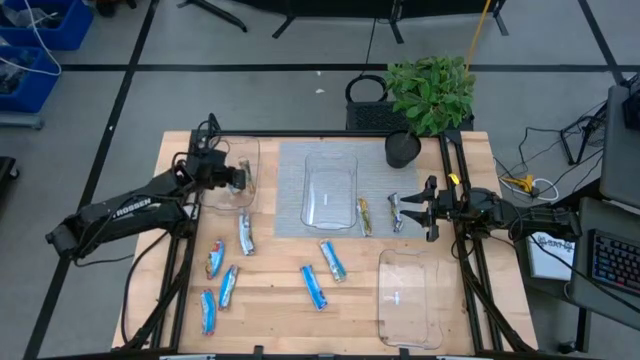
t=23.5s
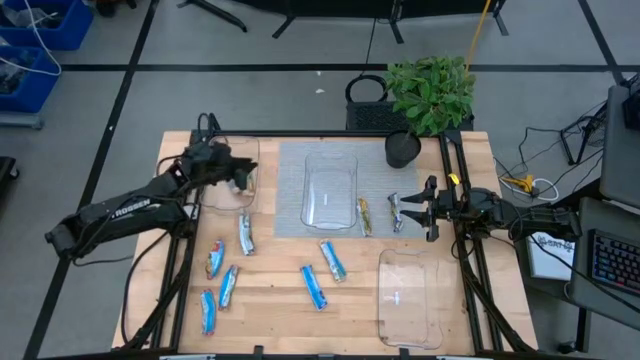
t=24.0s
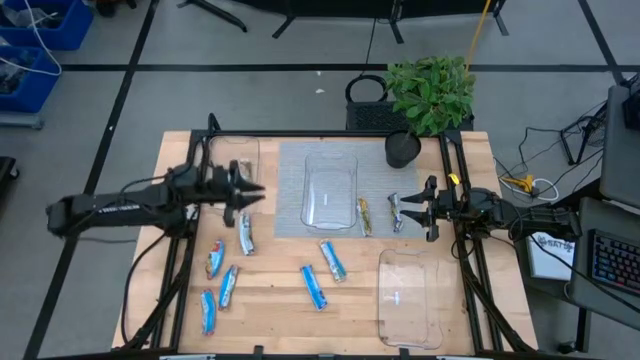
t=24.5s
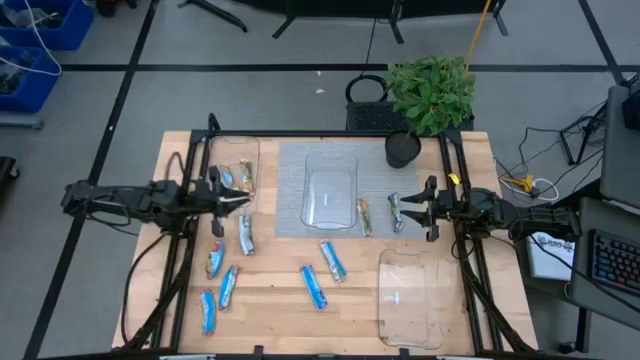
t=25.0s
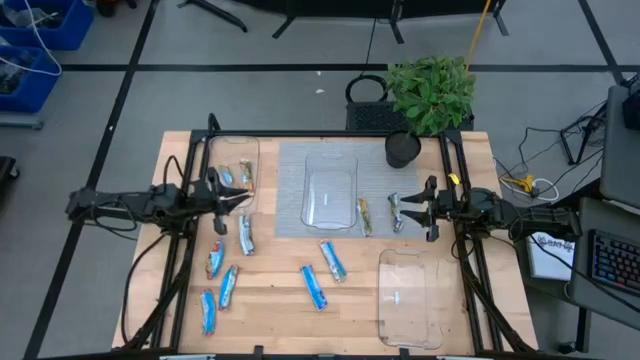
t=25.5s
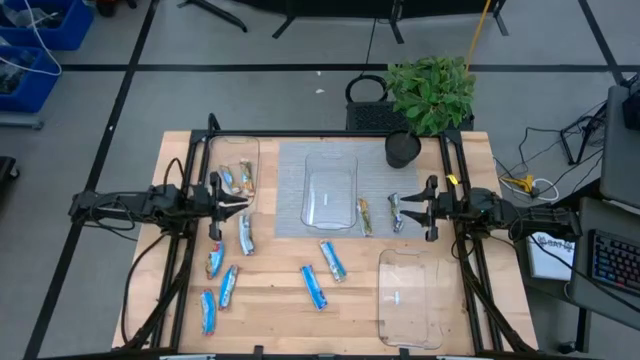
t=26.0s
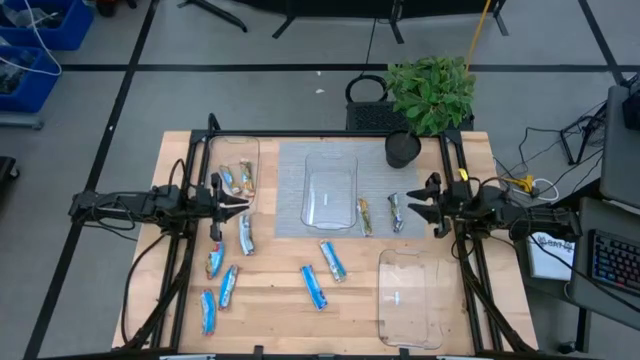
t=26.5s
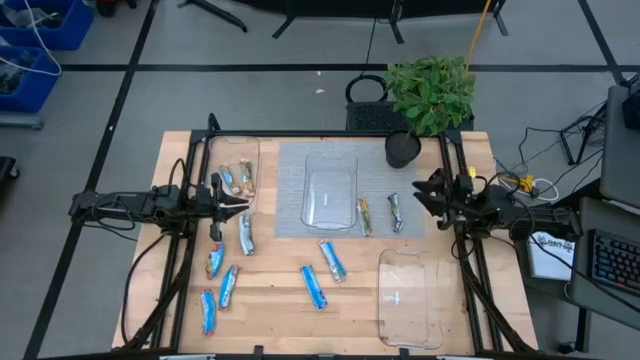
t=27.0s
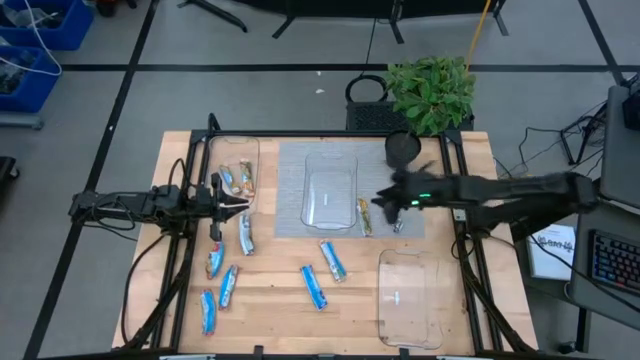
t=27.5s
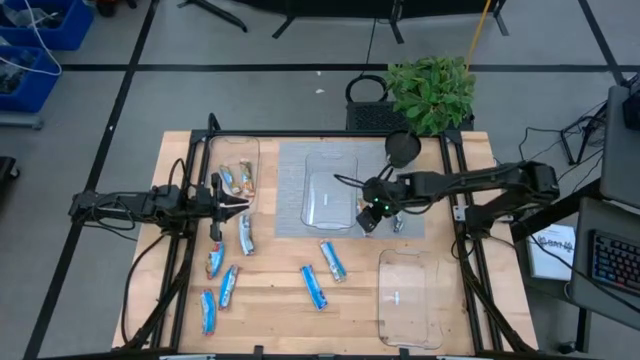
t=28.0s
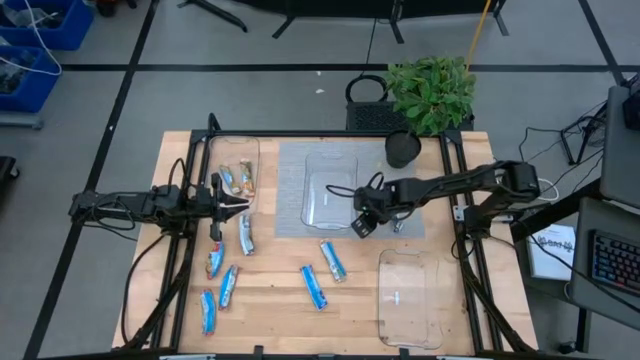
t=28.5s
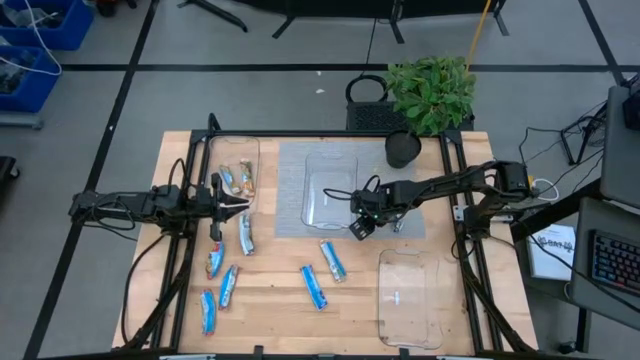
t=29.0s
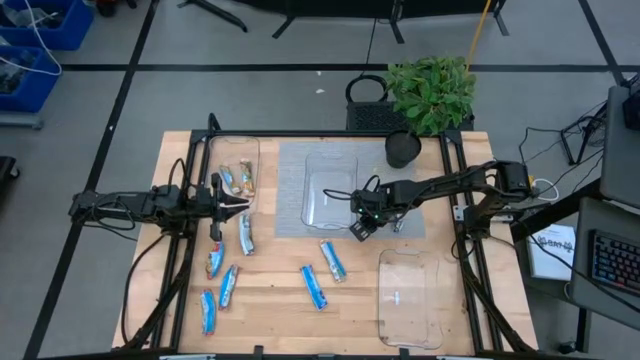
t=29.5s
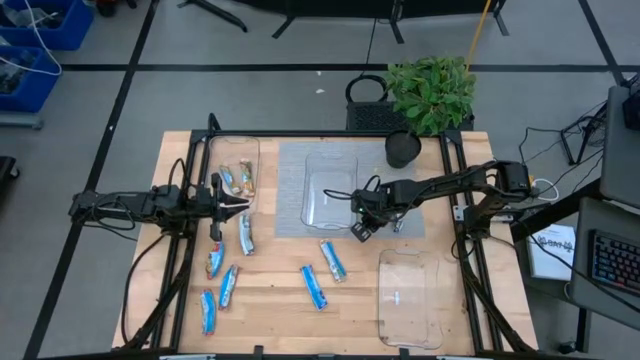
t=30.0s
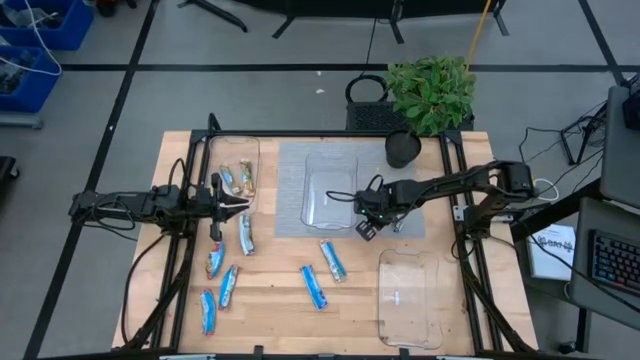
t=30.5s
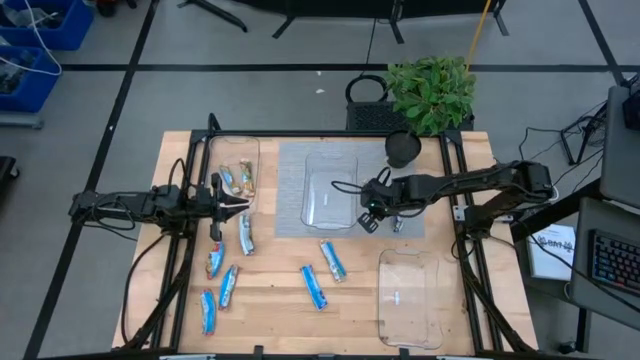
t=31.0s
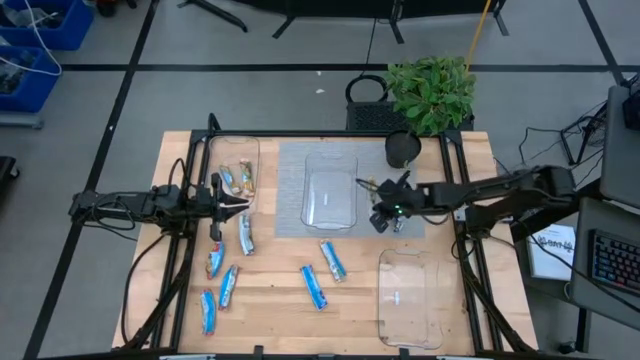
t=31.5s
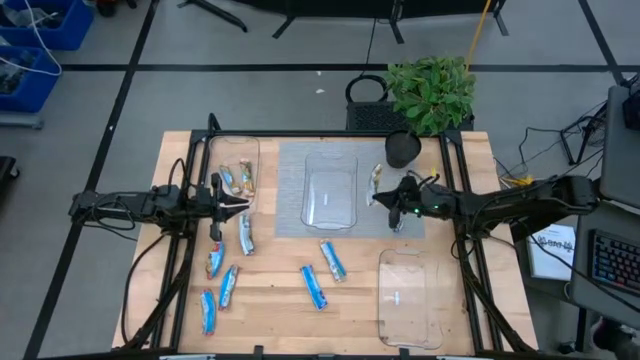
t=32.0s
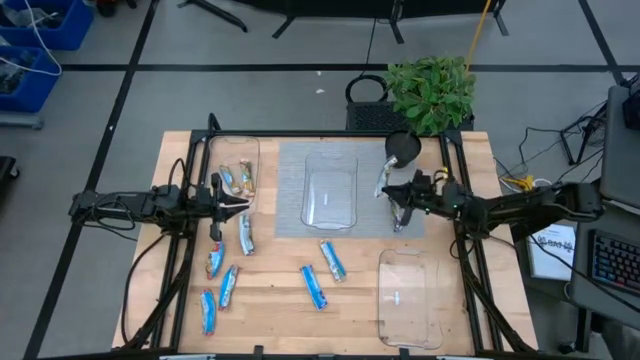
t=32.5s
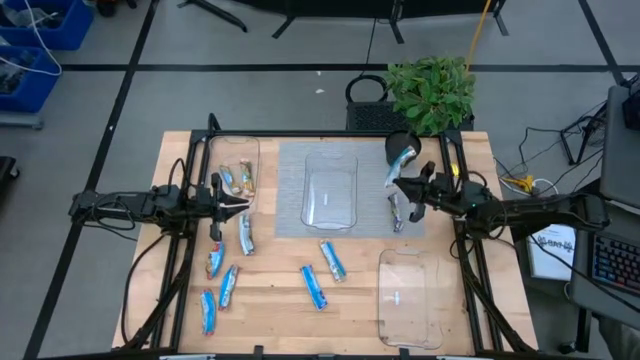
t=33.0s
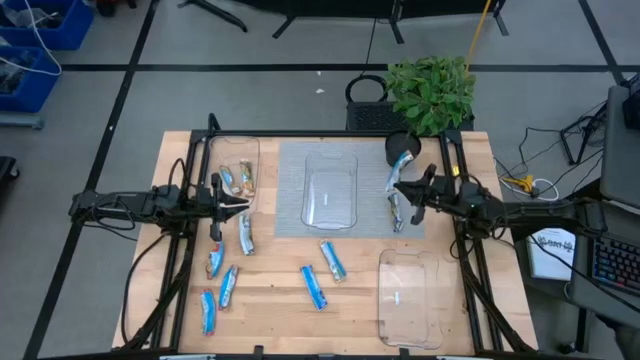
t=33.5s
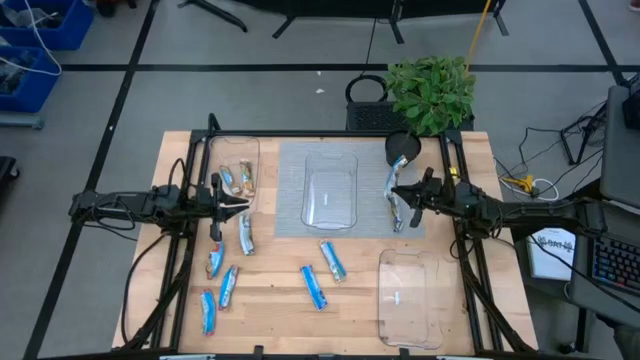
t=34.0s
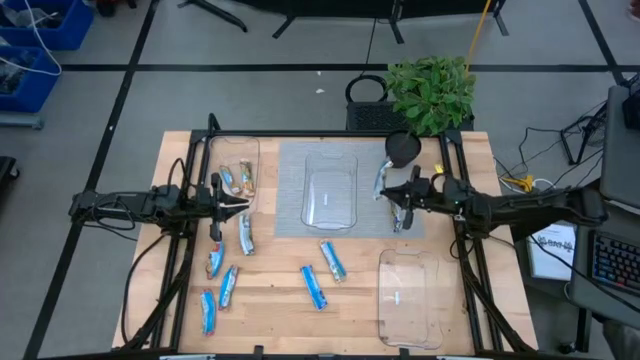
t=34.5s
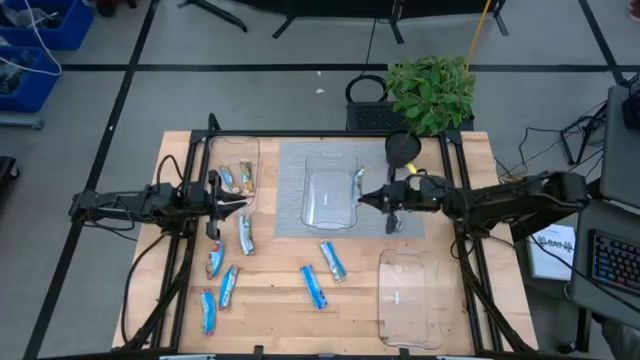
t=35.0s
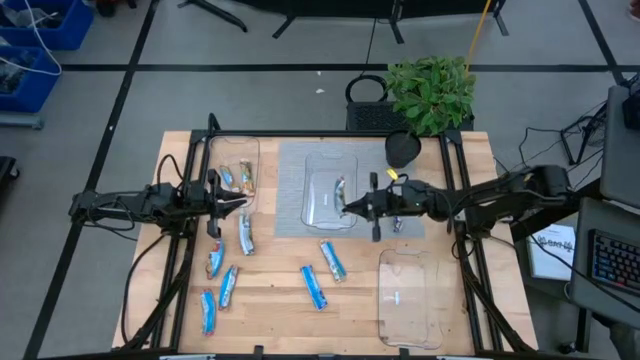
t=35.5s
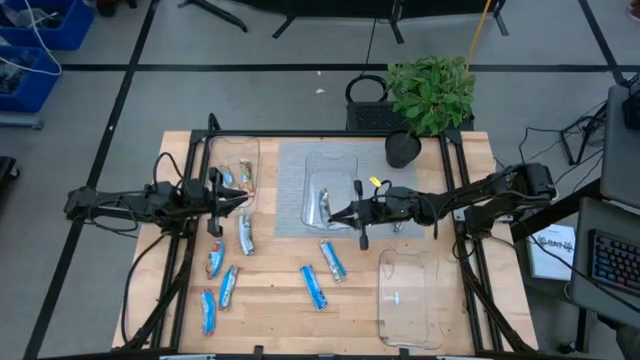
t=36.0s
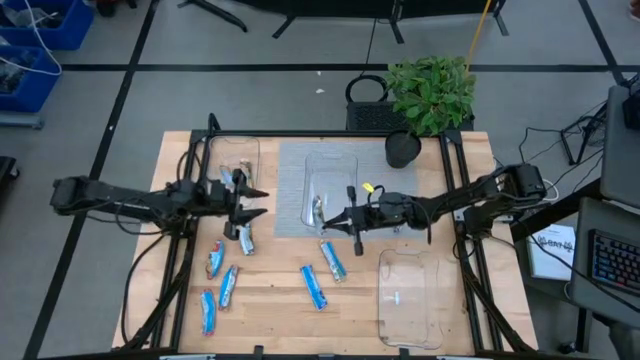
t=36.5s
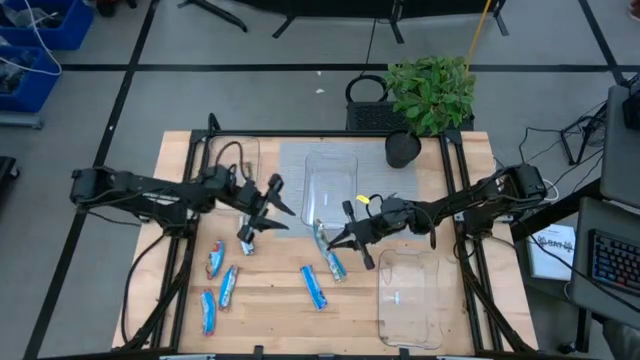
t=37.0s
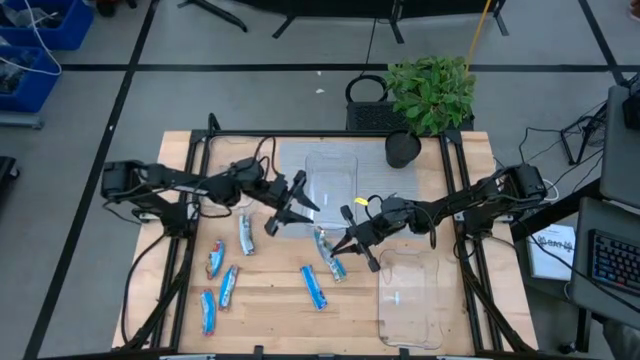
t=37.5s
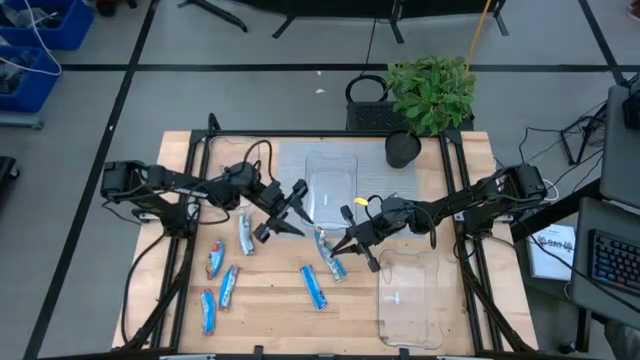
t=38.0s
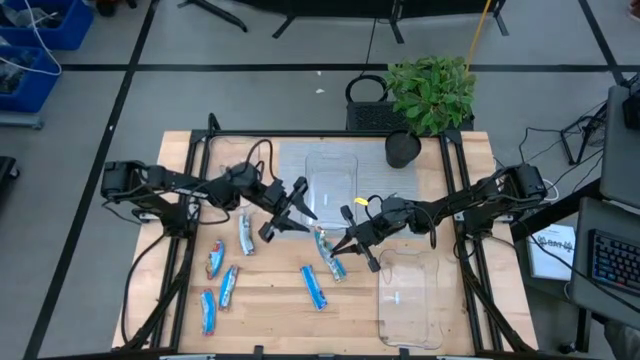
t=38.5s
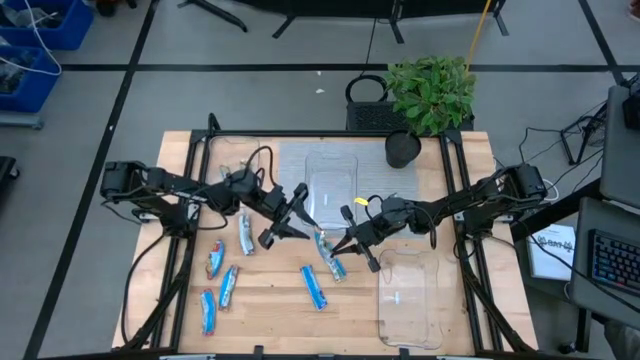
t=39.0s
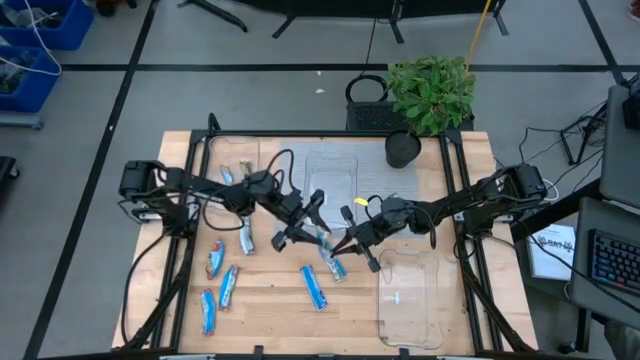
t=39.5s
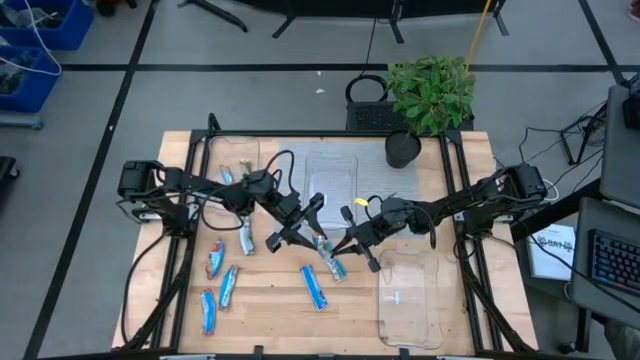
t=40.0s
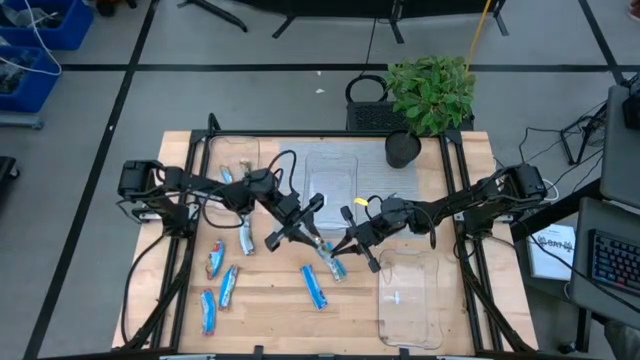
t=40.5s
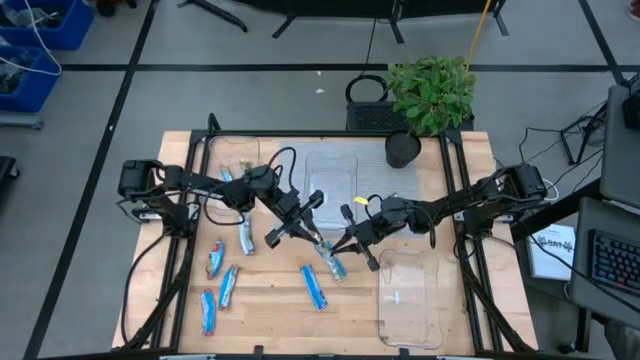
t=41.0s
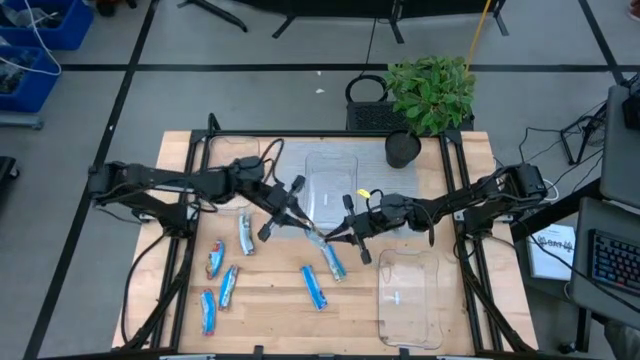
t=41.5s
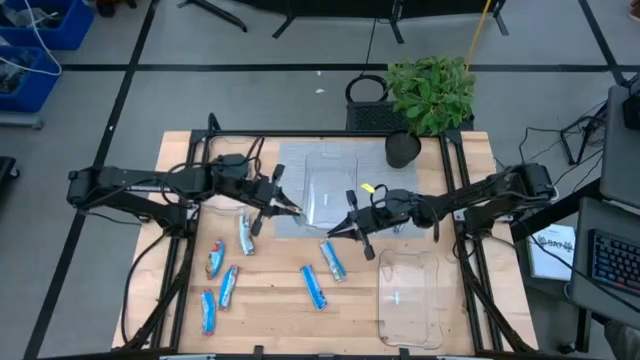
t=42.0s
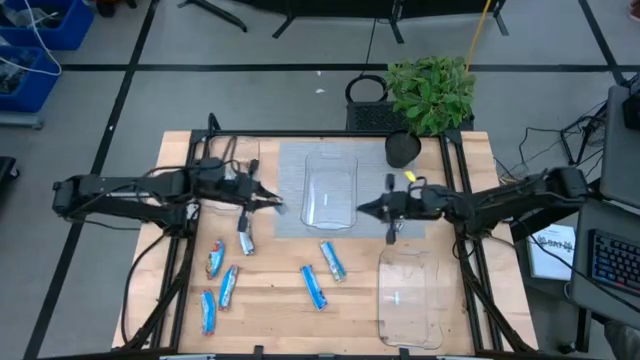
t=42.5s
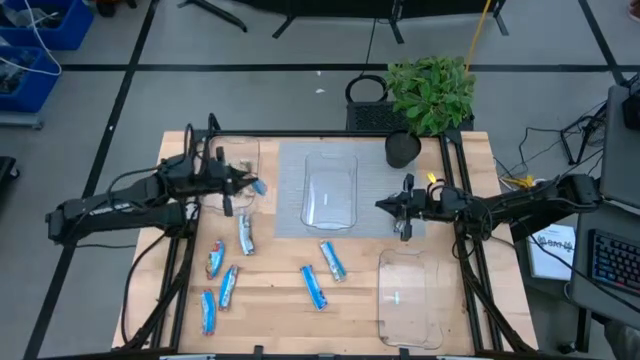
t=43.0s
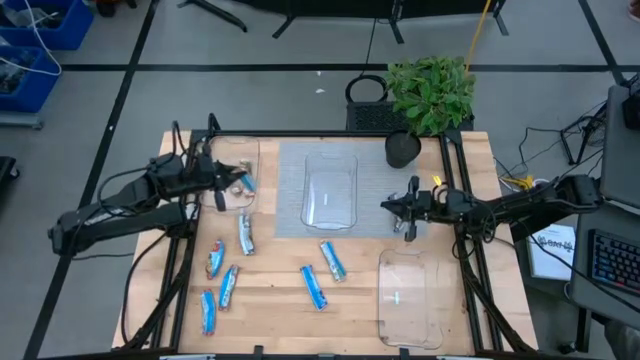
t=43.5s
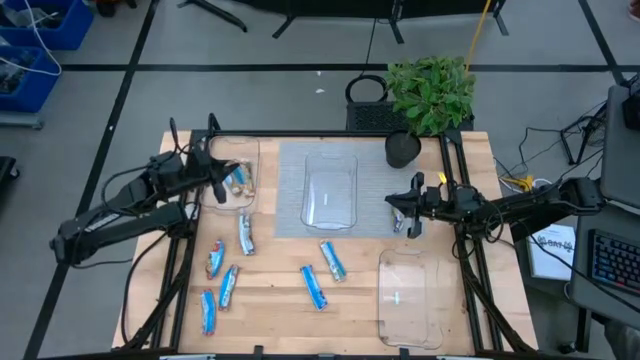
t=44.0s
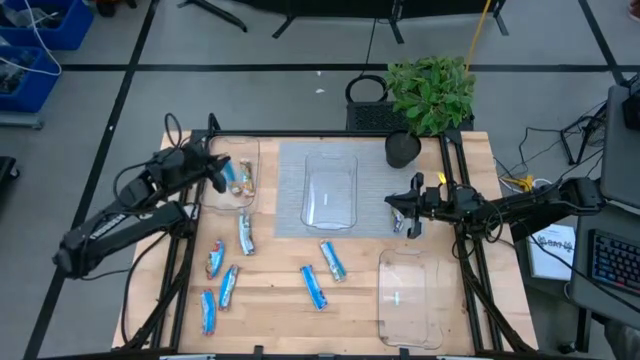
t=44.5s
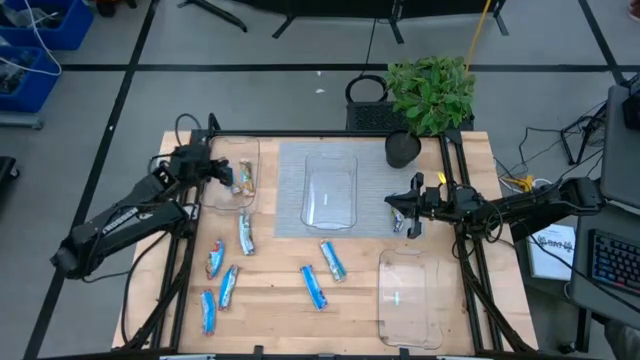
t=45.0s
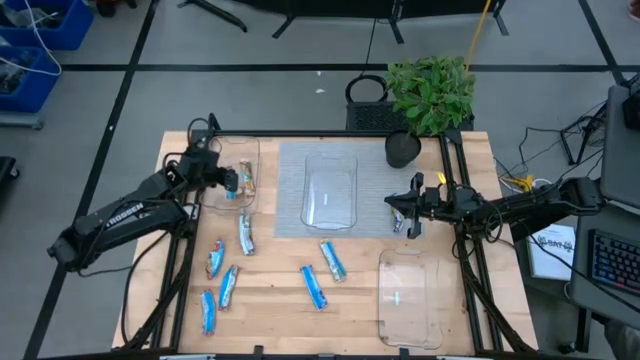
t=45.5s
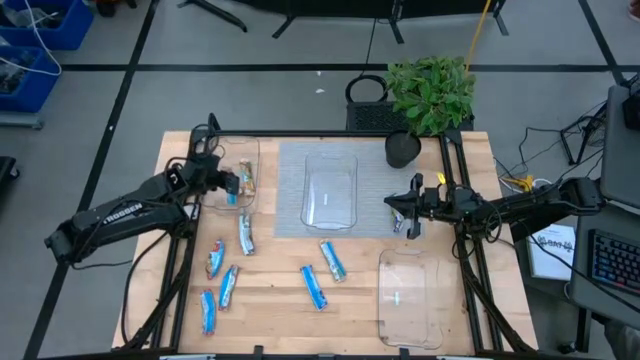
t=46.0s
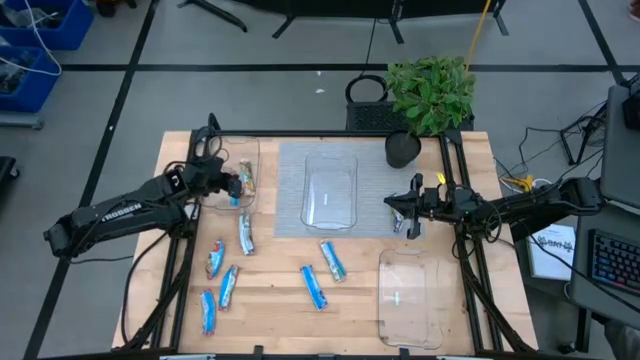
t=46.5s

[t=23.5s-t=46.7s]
Task: Pick and place Granola Bars by type
Put the yellow granola bar into the top left transparent bin
